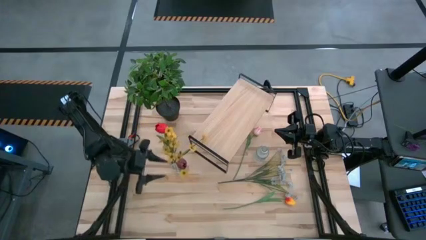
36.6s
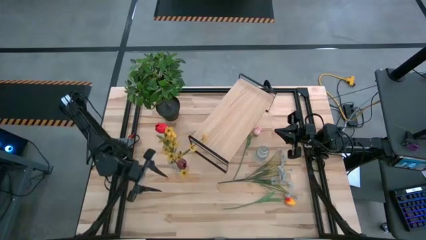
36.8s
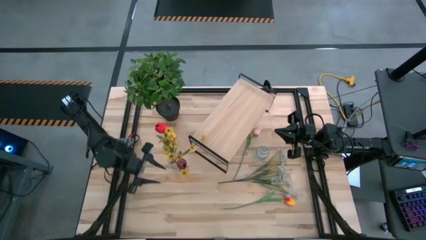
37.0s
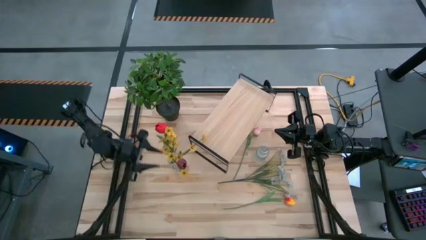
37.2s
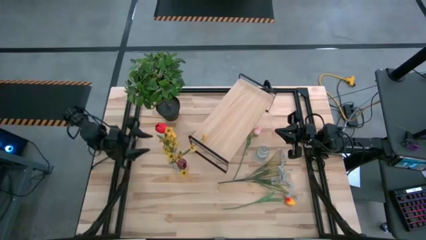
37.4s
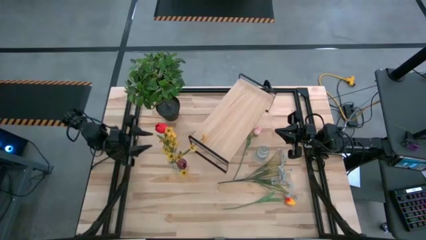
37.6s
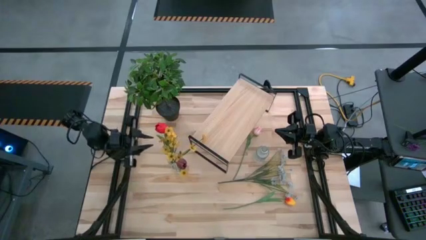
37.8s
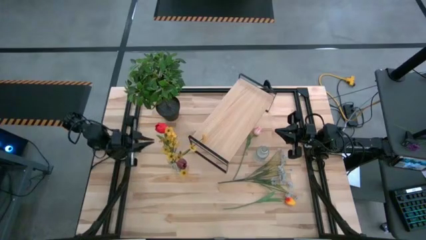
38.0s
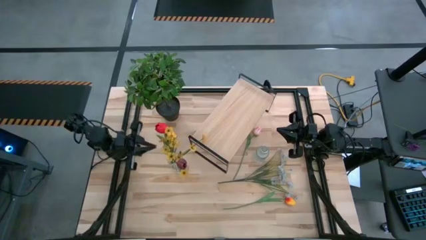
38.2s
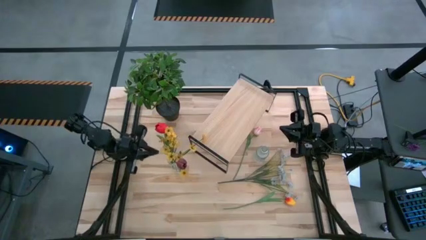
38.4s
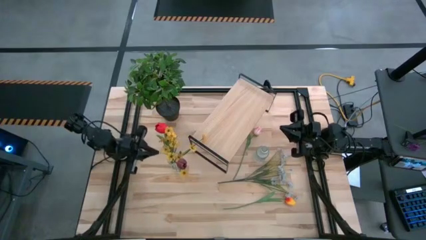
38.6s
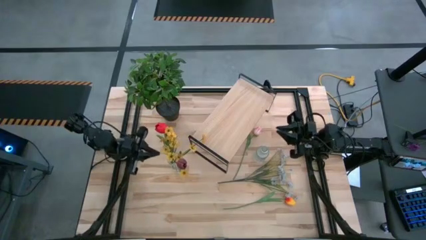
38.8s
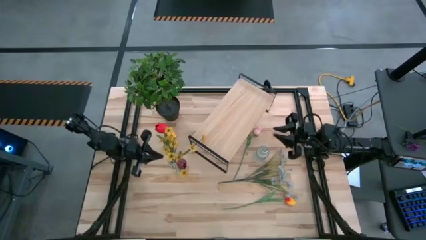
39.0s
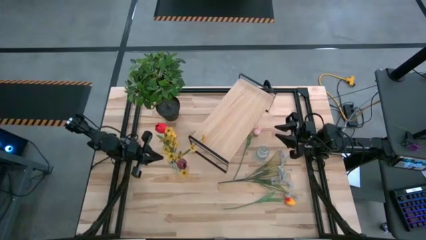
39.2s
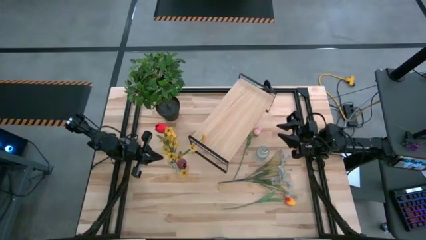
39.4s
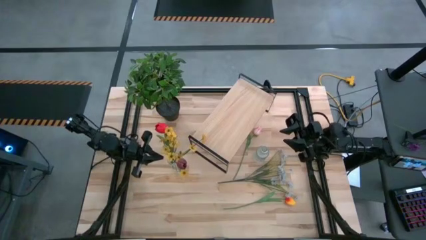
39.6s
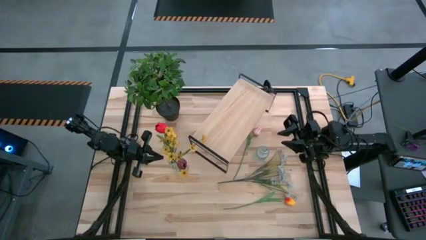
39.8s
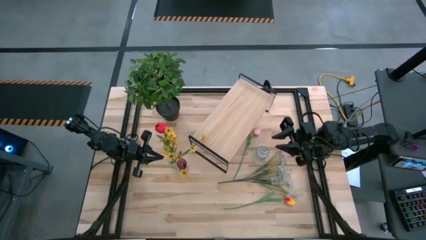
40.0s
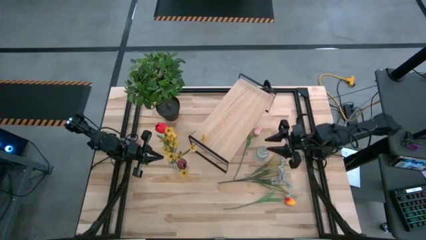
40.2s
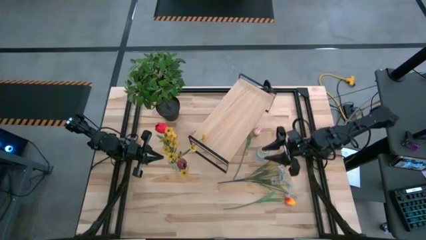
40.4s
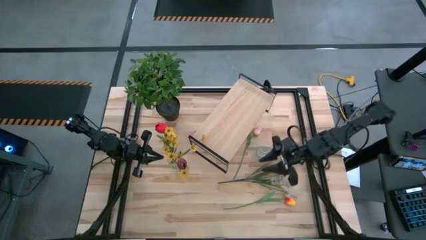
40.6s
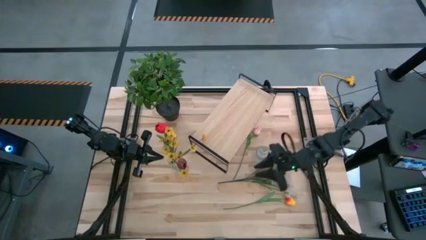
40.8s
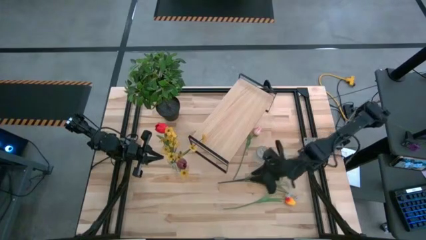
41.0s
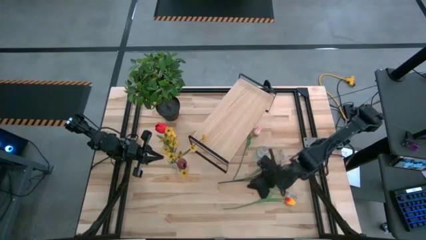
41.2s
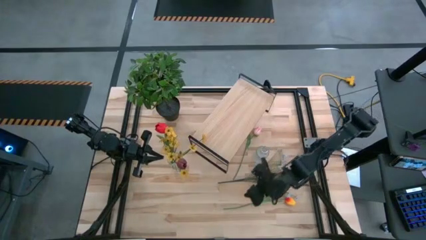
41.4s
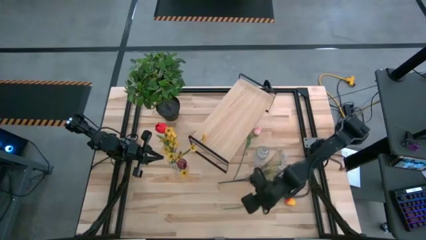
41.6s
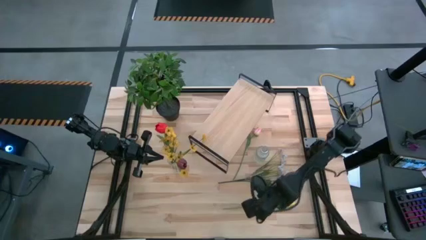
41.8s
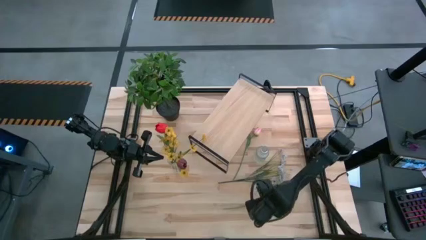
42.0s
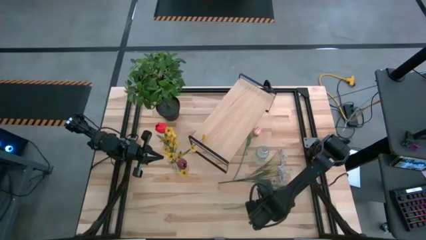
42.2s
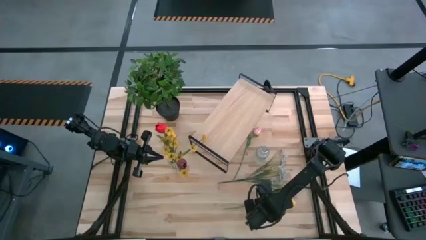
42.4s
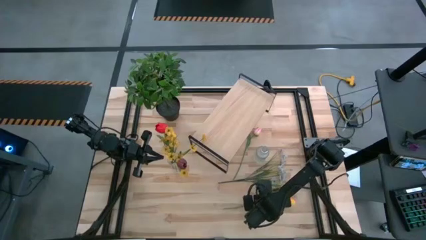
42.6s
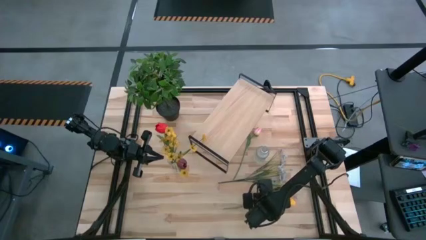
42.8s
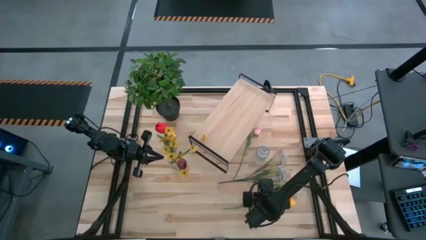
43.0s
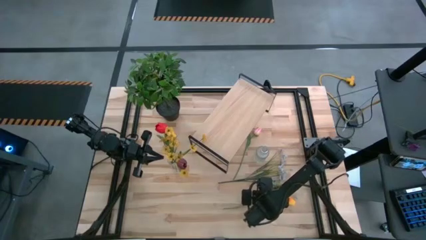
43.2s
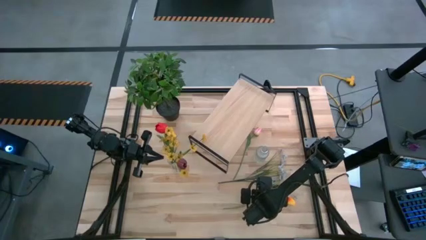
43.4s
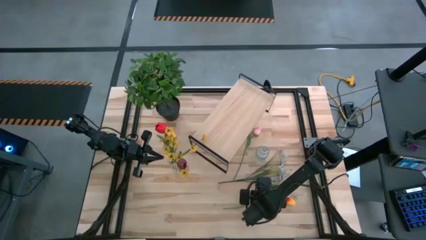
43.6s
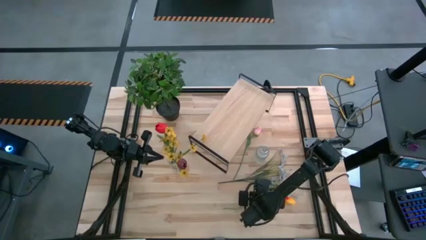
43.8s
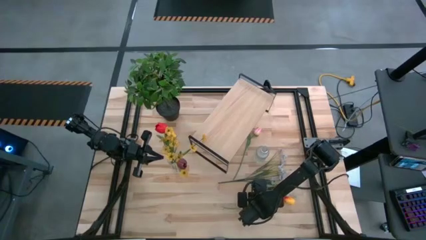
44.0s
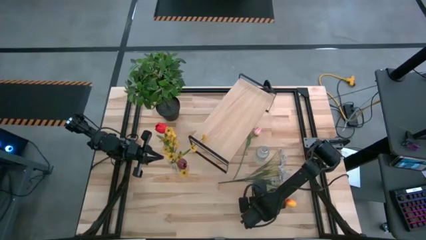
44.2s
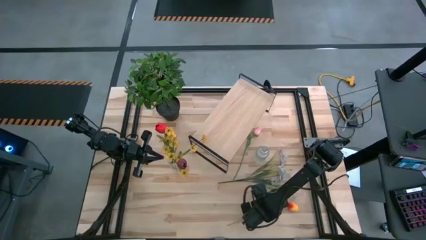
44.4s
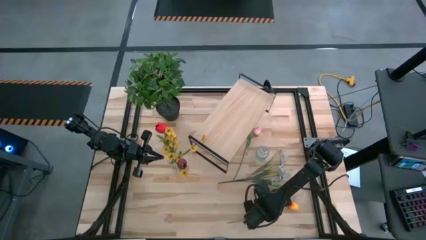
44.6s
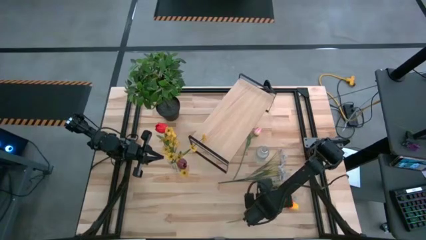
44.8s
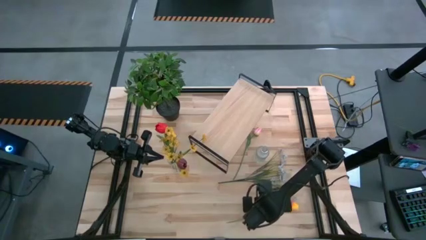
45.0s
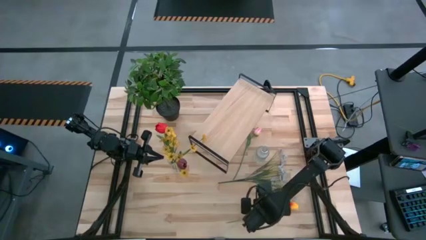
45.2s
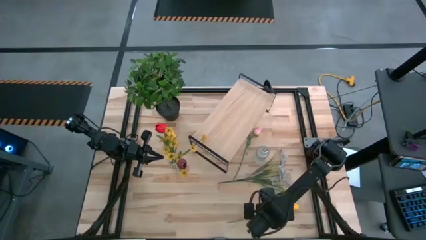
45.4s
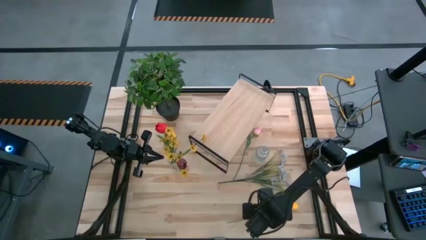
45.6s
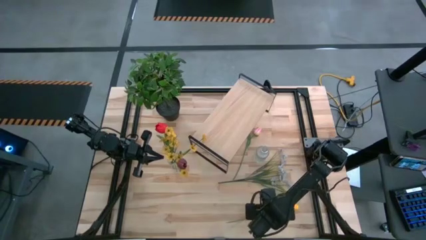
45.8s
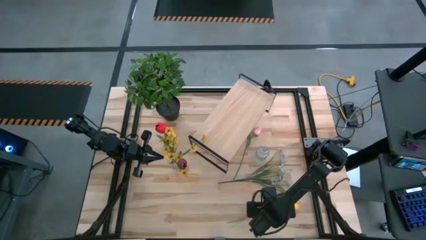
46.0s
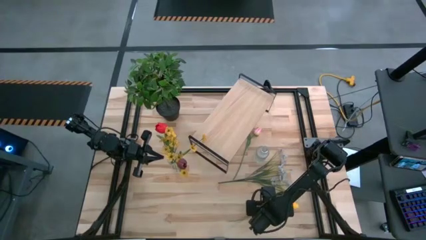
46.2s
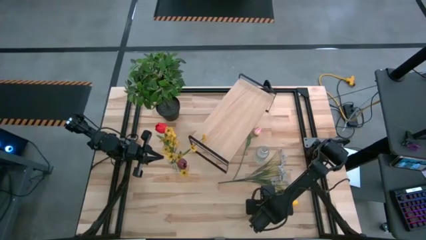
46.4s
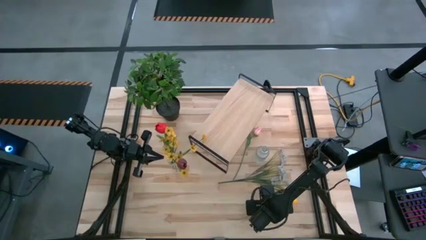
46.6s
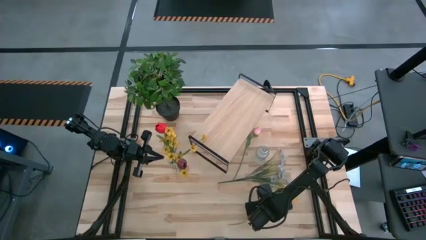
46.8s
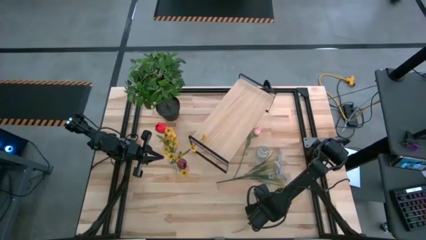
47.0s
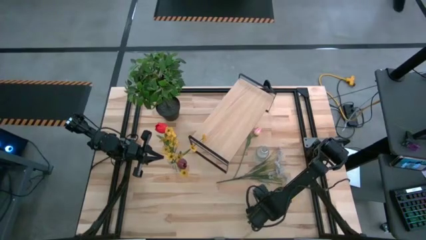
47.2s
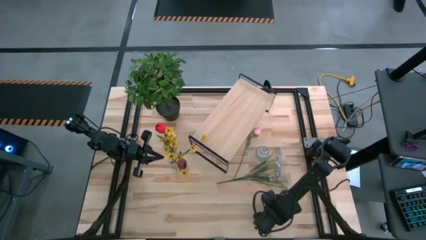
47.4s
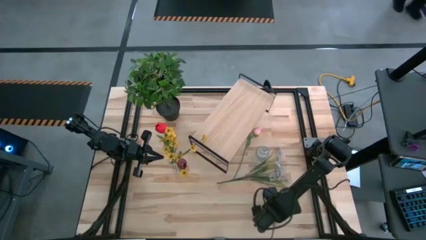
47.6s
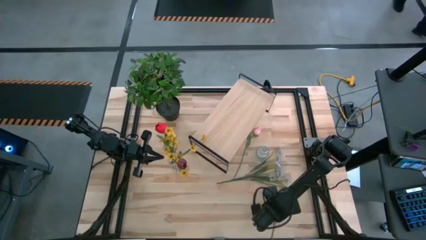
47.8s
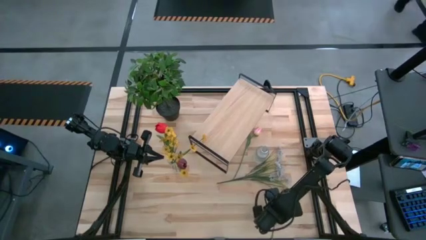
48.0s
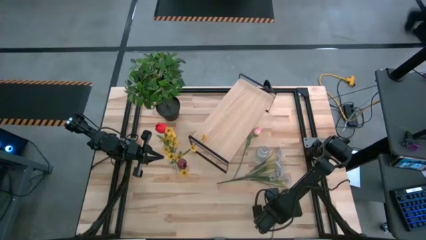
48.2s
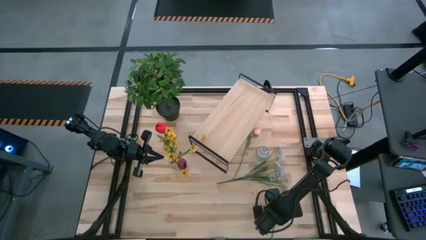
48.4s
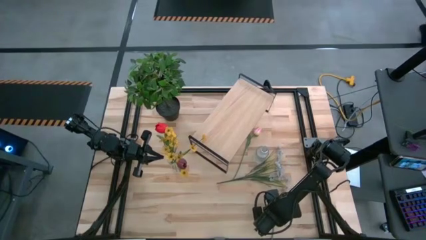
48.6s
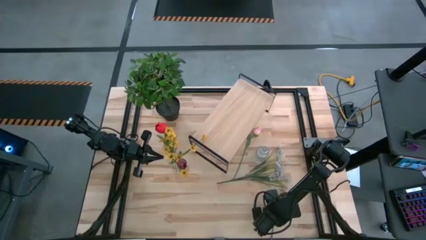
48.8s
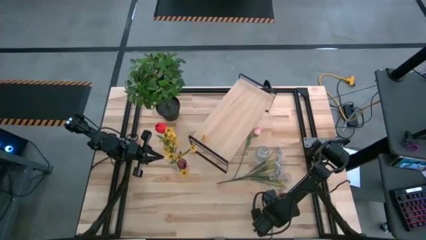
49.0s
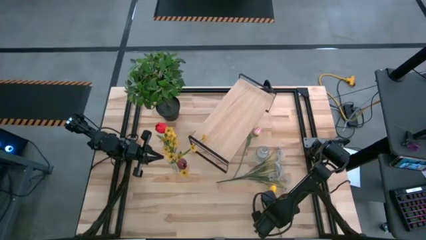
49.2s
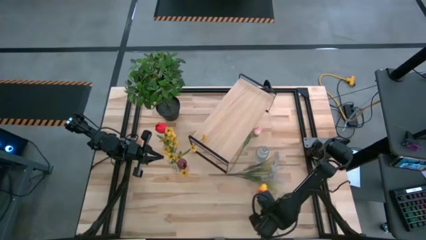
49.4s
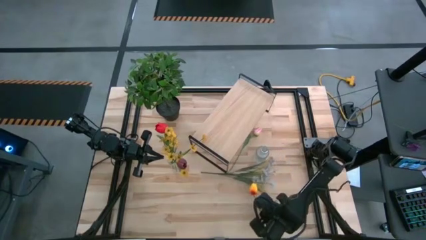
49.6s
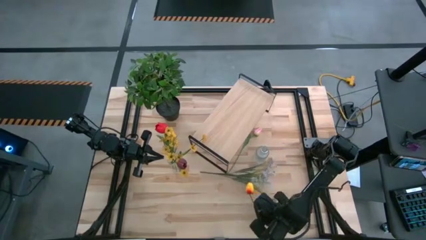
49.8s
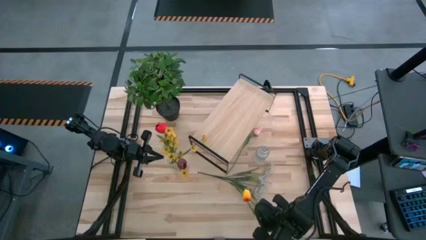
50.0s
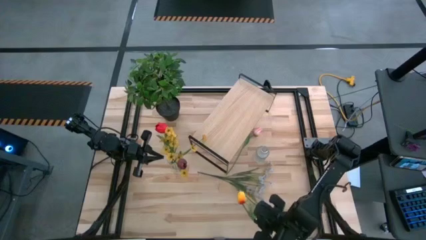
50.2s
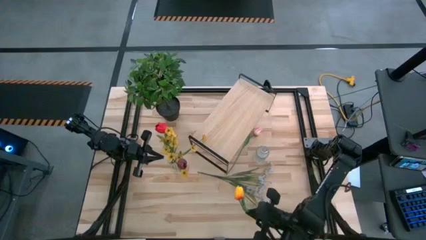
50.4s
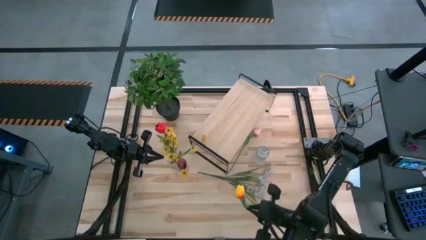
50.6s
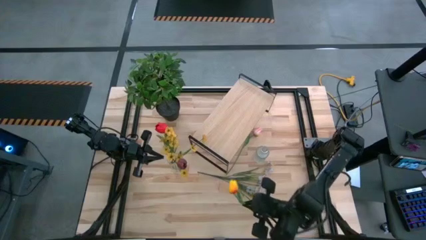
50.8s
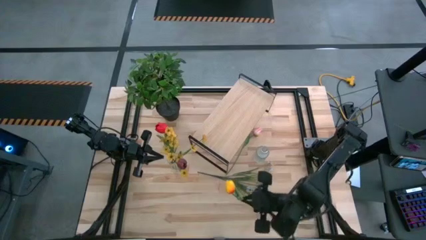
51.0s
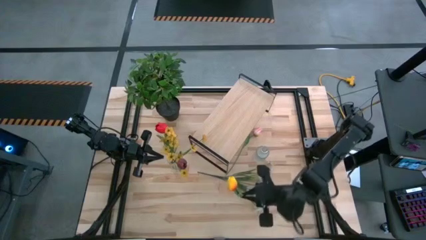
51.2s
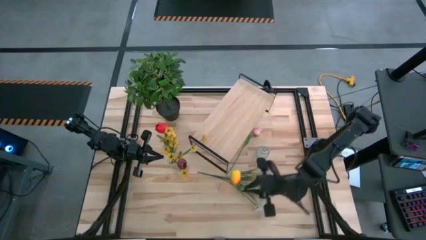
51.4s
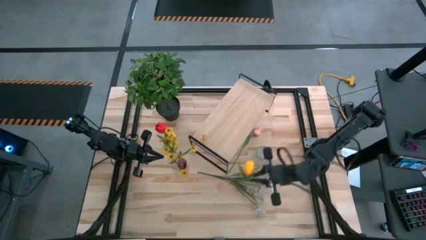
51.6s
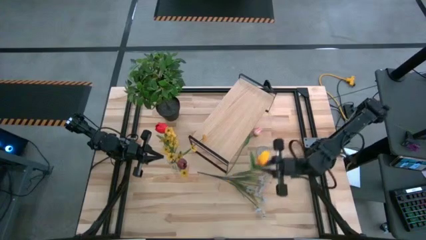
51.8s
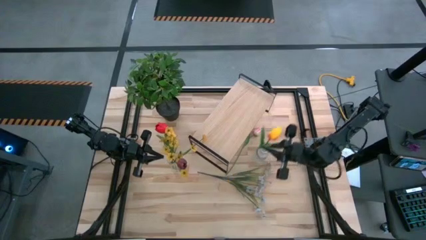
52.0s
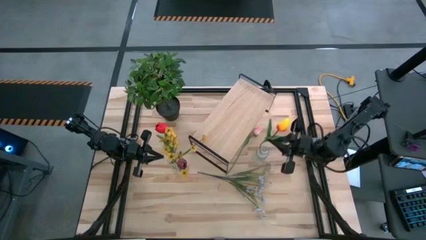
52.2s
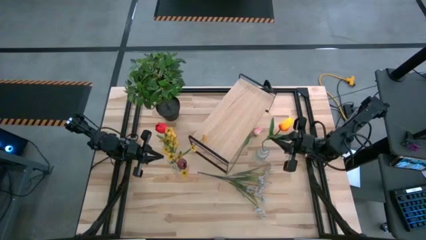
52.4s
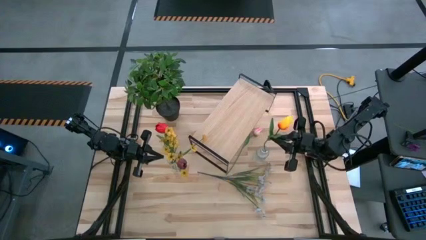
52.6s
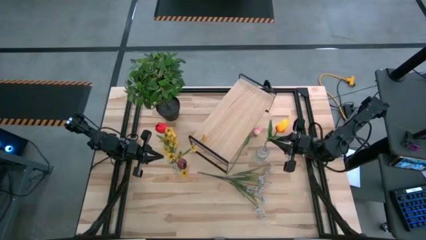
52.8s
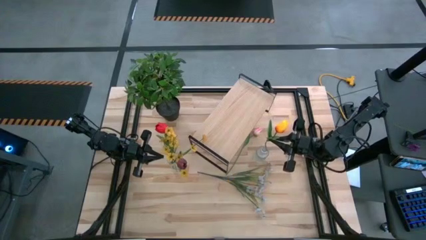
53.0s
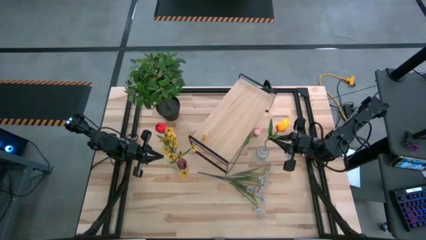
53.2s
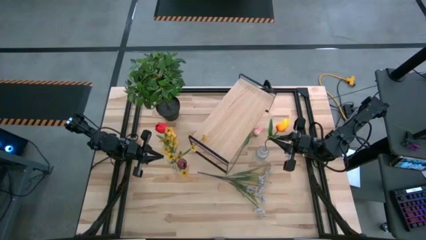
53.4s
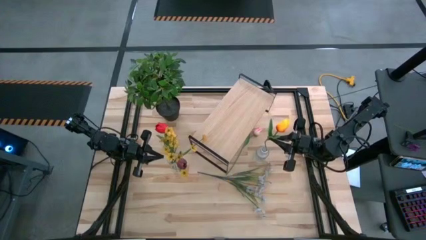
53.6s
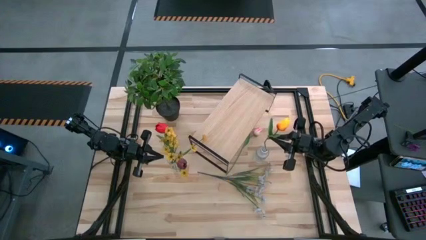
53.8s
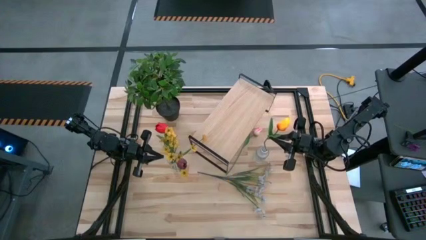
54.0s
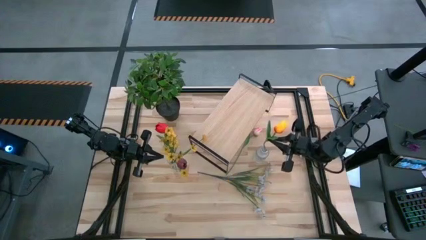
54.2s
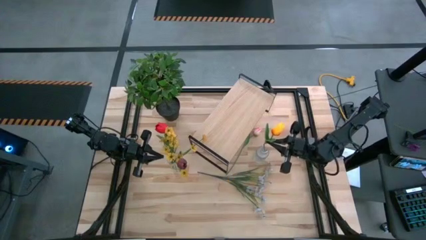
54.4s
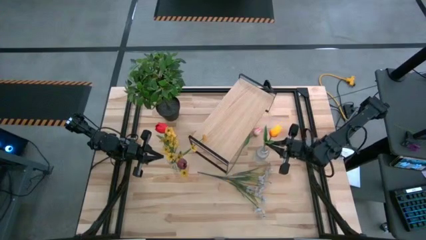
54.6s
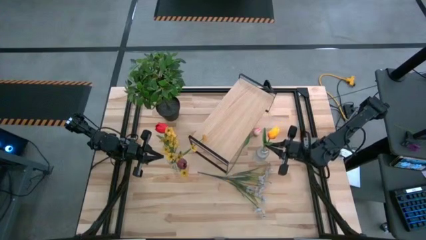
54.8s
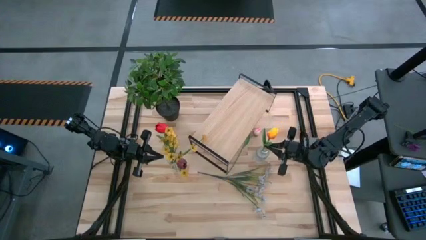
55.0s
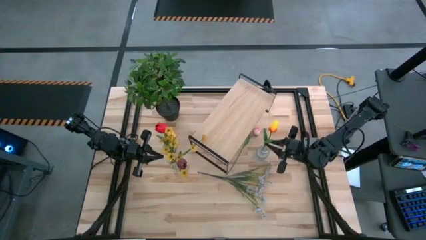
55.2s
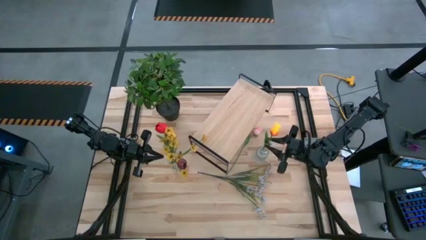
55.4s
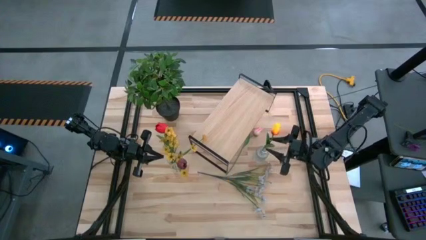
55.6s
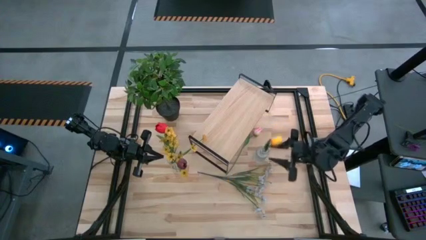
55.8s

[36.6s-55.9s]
Task: Pick and place flowers into a vace then onto a shelf
Put the red and yellow flower into the right transparent vase
